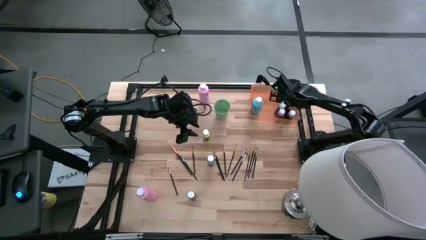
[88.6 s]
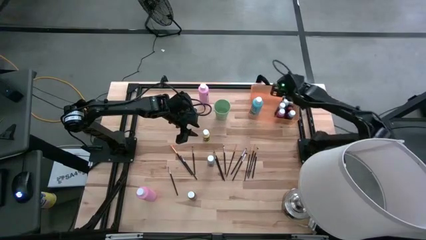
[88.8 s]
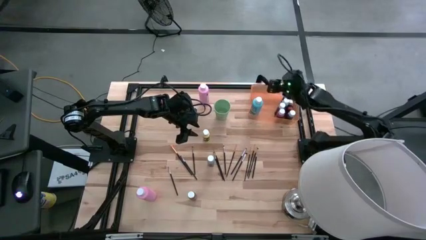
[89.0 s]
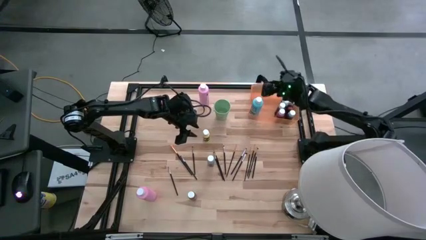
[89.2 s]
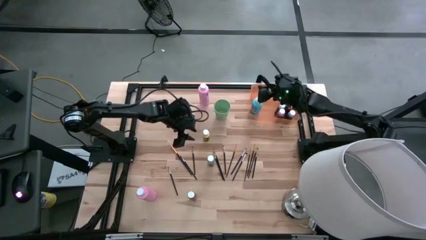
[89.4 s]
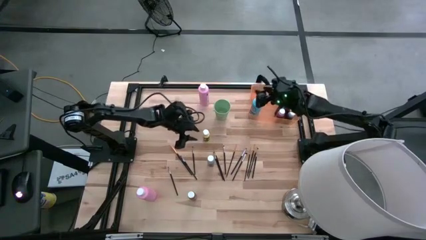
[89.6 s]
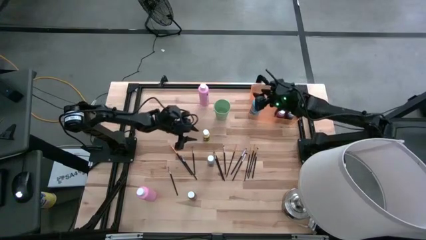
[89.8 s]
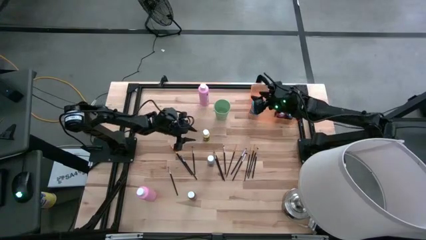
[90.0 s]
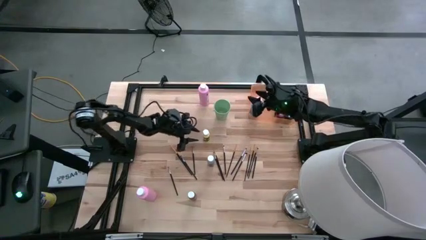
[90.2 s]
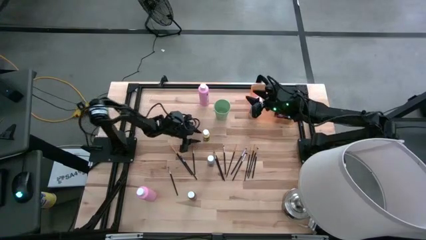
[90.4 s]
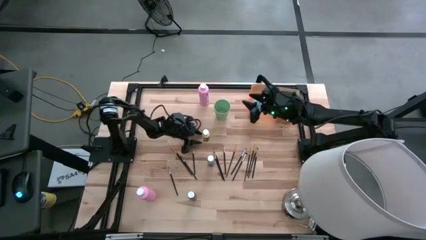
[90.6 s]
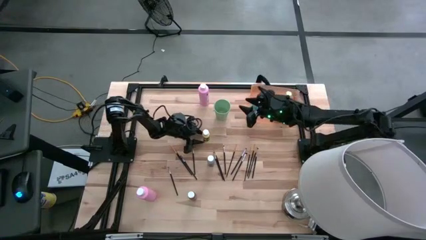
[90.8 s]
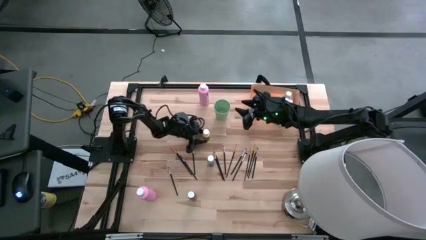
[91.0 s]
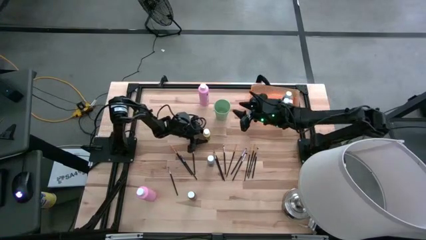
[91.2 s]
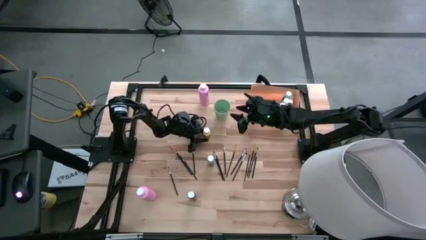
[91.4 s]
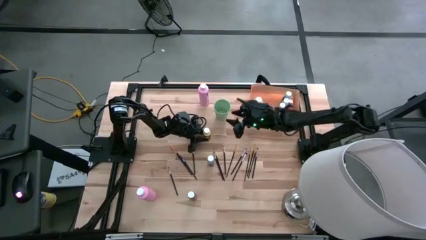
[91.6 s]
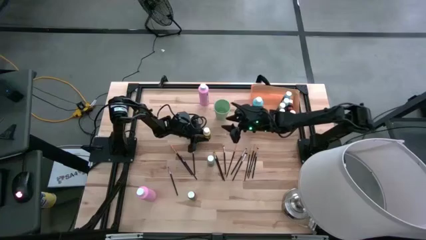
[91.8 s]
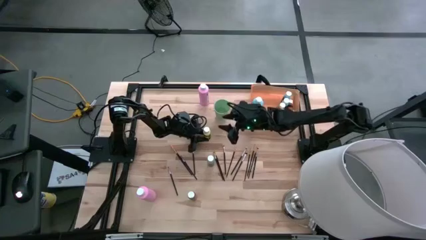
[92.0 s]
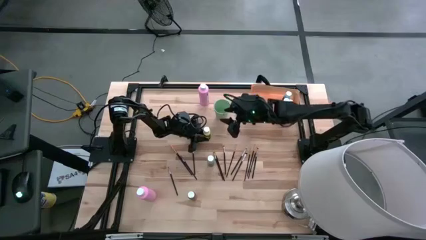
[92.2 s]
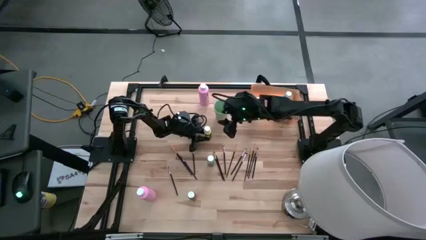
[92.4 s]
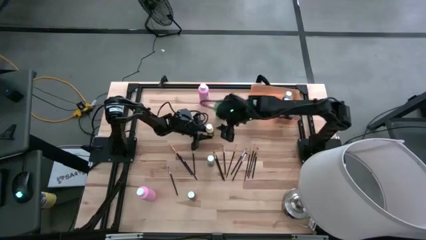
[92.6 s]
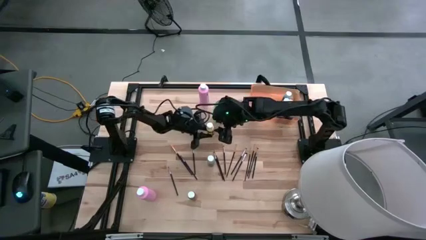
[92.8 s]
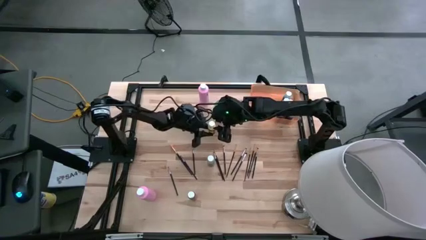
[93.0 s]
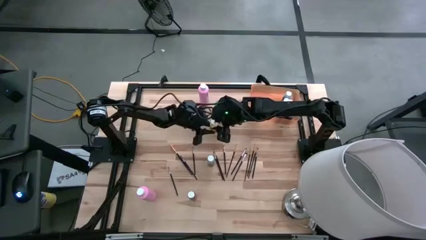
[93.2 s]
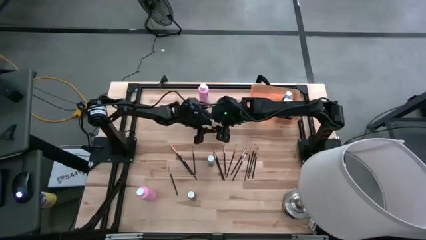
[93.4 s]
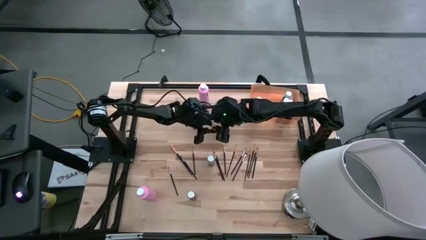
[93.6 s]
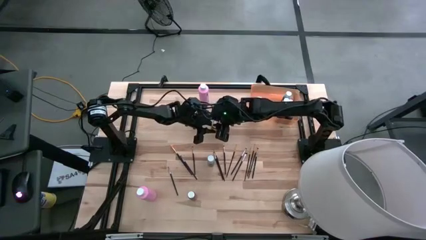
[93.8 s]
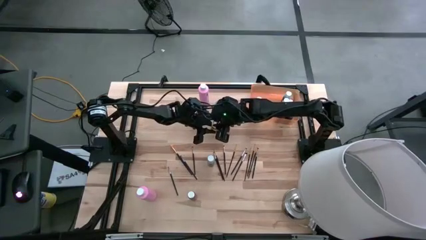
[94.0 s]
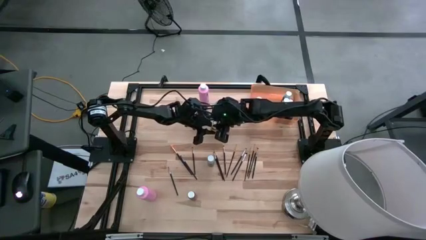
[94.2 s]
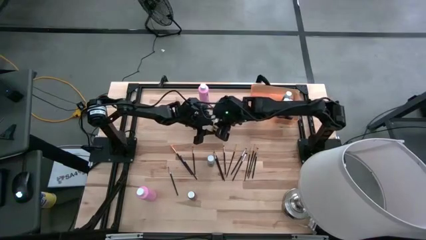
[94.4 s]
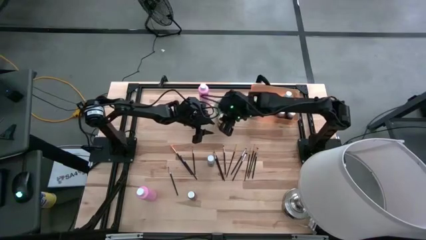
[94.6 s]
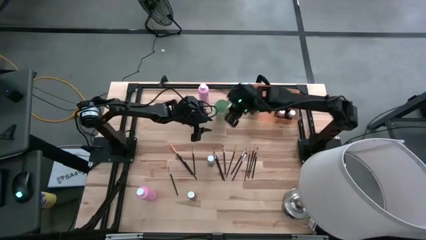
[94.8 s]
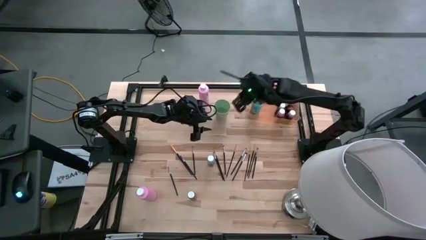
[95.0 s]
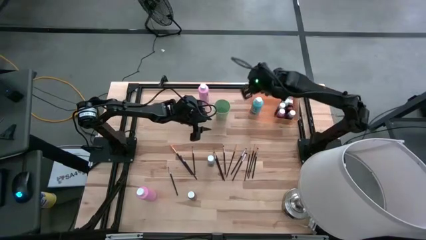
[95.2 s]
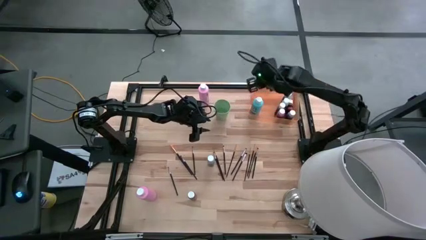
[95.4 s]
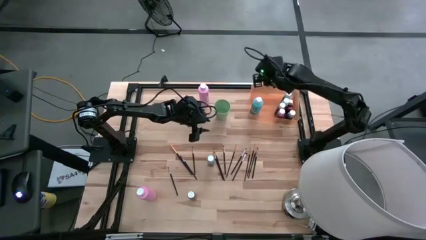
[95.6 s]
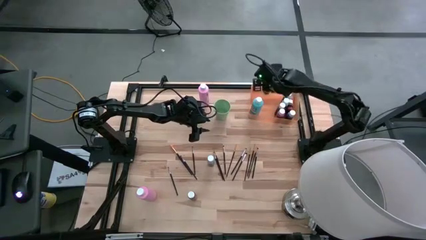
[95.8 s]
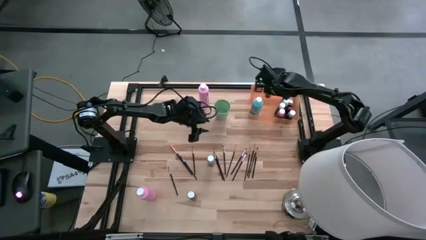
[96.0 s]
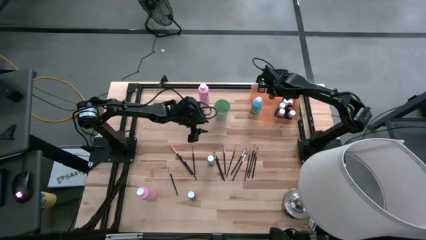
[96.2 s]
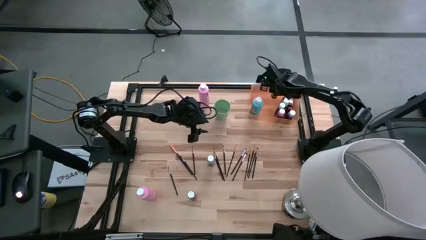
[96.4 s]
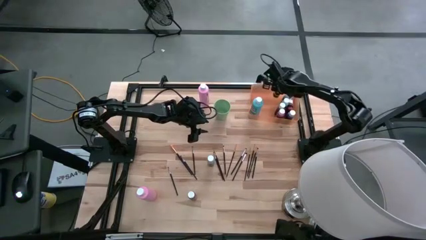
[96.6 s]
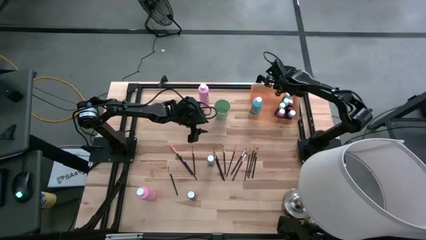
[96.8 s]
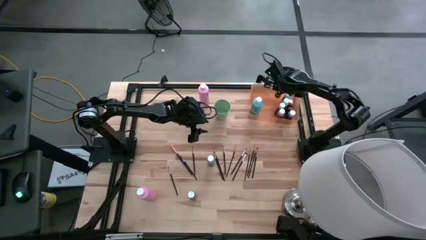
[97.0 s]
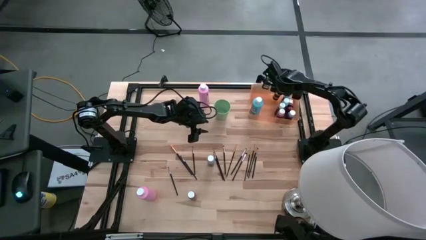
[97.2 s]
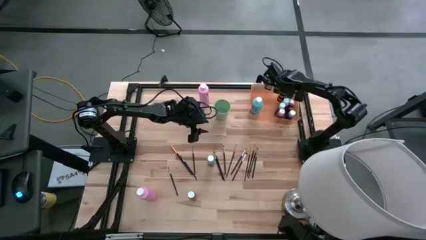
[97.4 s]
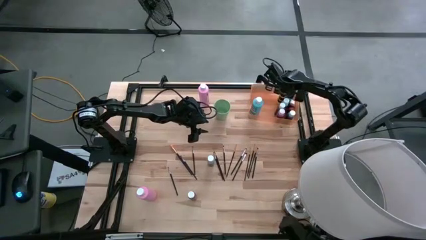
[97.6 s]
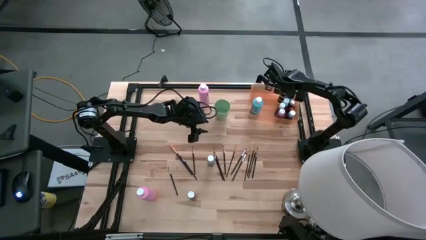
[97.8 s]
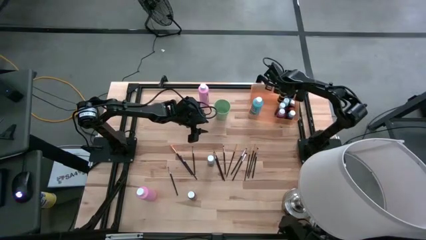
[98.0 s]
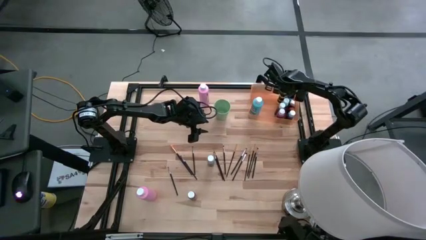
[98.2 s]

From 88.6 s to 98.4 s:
Task: Pick & Place Paint Supplies
Put the small yellow paint bottle into the orange bin

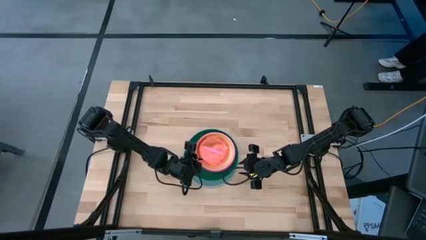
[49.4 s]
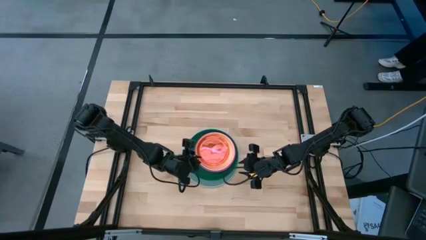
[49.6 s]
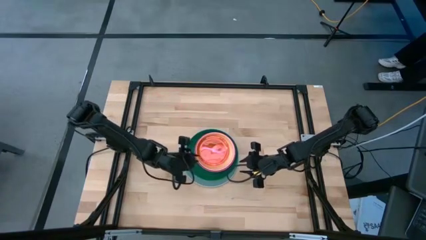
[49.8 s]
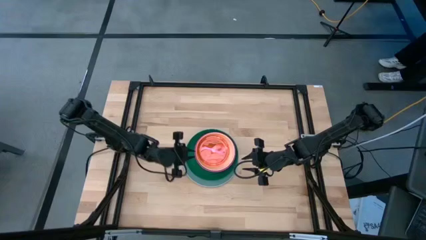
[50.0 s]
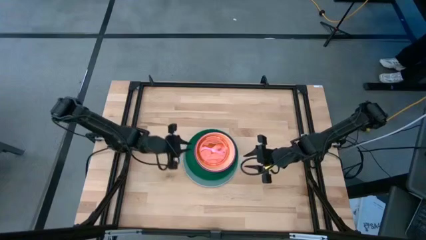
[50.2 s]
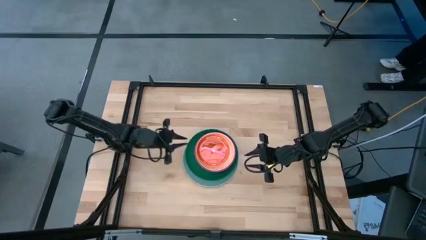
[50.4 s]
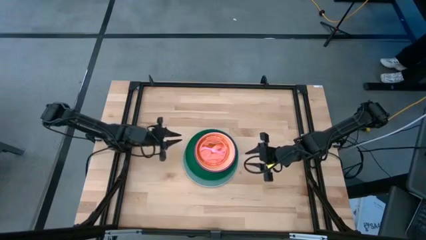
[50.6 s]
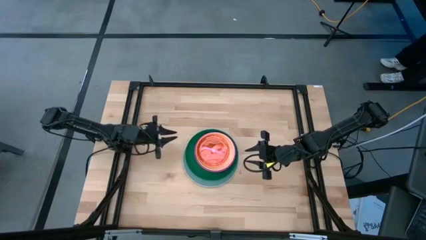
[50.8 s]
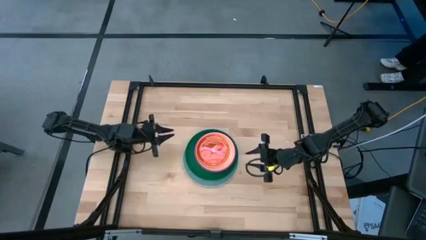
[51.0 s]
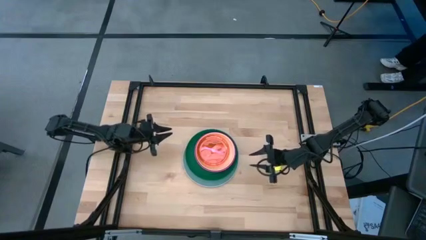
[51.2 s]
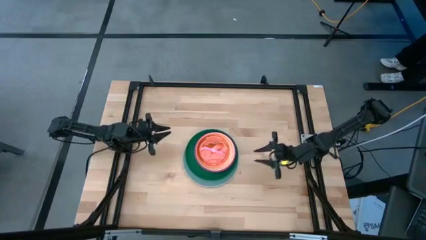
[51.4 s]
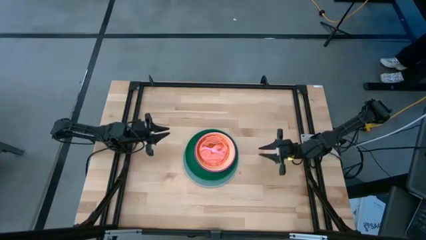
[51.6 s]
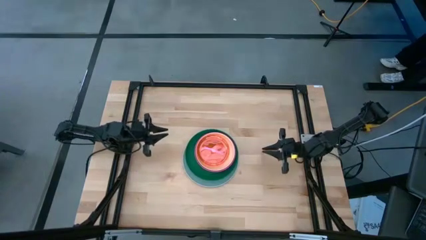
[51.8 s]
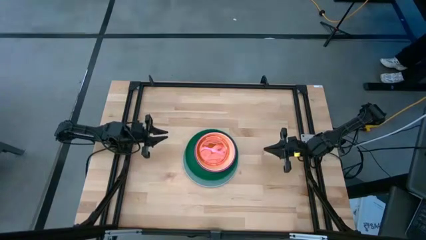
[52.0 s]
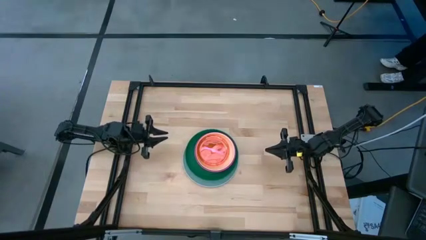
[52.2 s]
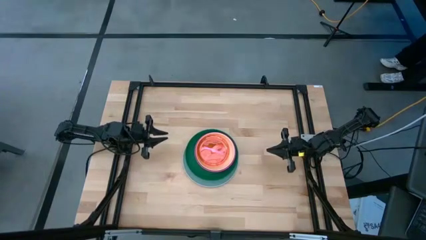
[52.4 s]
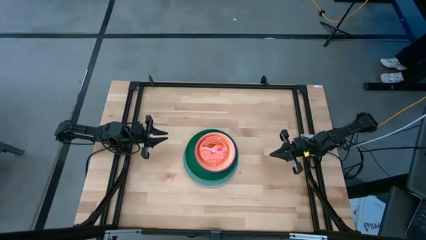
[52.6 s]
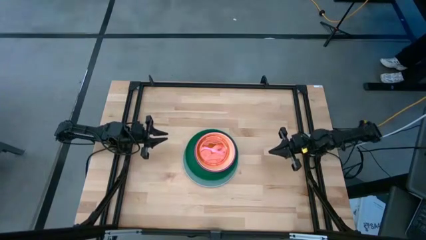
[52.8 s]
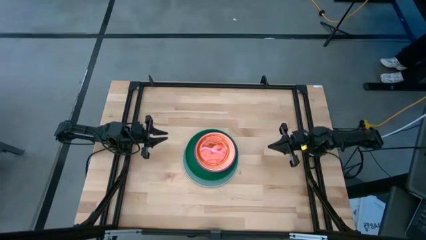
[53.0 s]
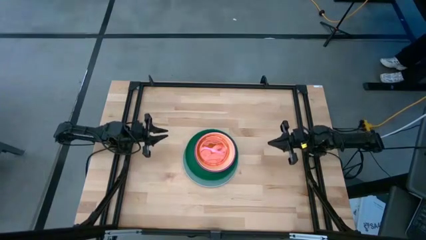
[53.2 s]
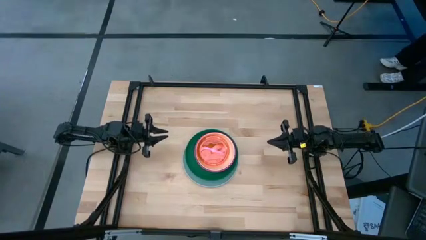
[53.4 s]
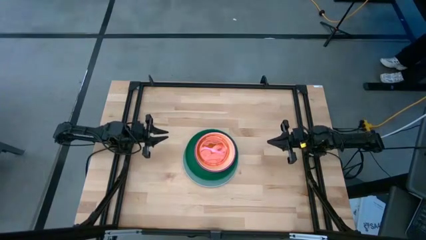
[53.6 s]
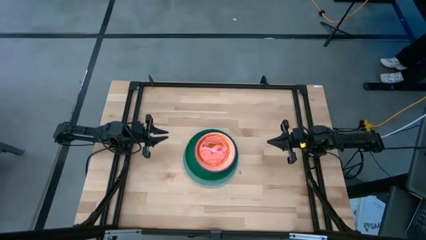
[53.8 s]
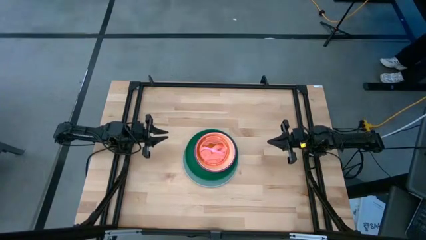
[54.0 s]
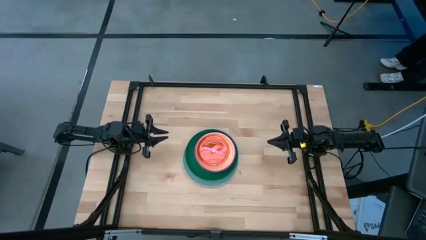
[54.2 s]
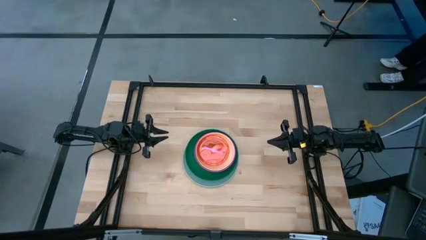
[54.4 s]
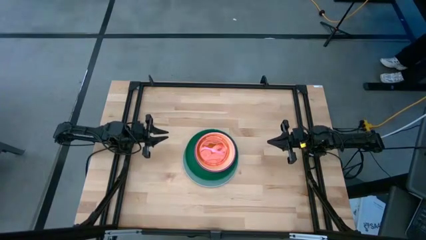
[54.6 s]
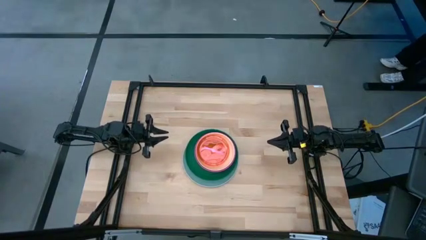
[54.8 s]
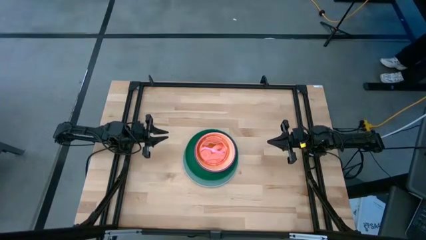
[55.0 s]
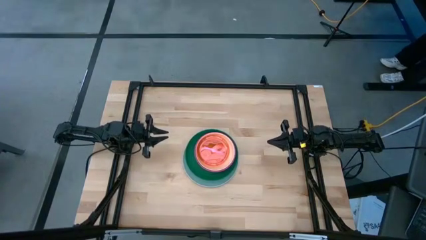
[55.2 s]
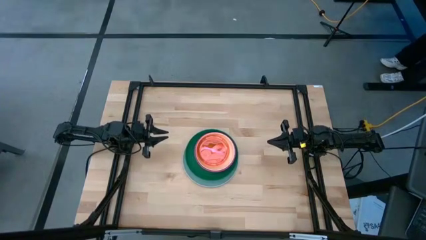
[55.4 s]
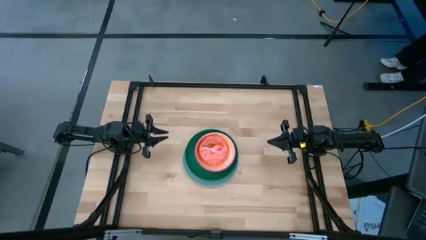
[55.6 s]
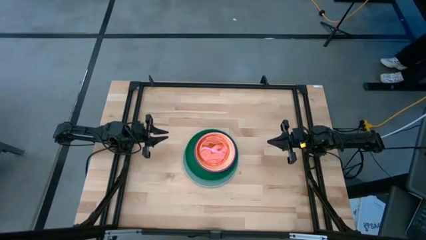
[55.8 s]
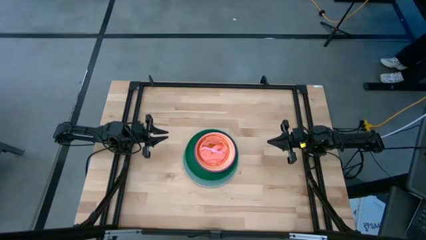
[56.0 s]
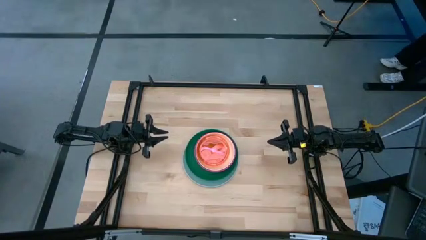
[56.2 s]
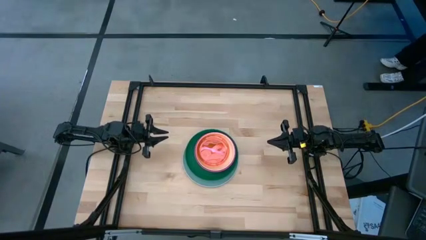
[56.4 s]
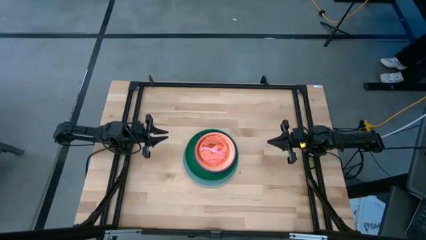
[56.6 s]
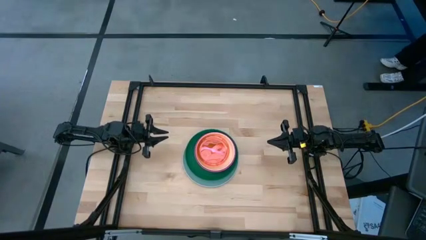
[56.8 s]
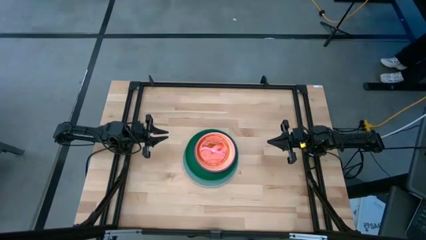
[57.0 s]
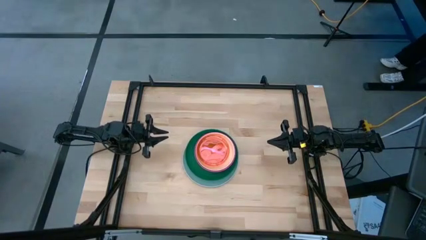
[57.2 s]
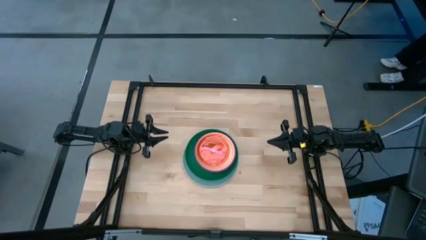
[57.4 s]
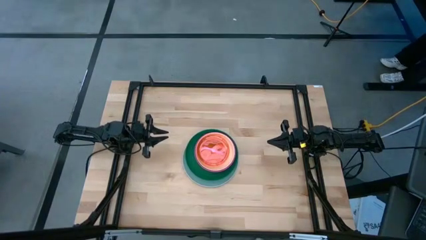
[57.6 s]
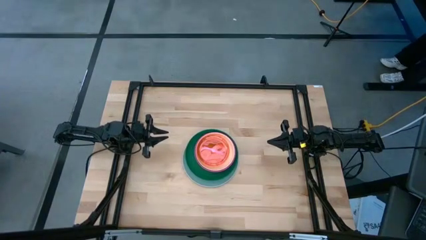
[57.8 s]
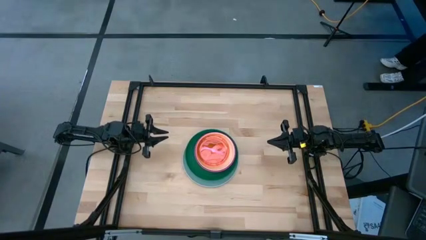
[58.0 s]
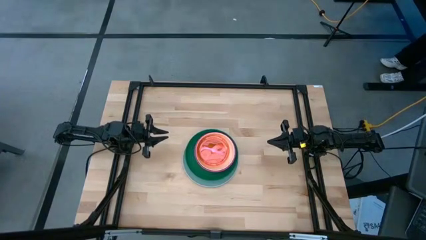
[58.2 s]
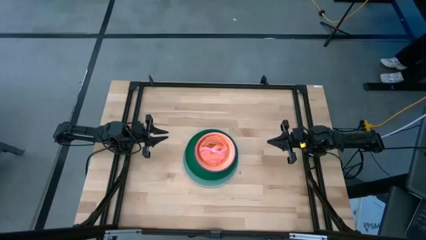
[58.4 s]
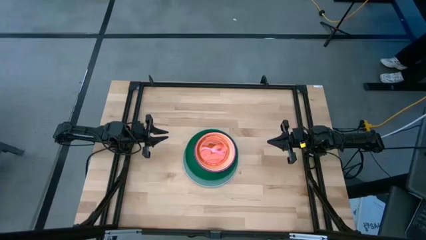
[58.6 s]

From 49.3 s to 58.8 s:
Task: Stack plastic plates
Return to Home Position
